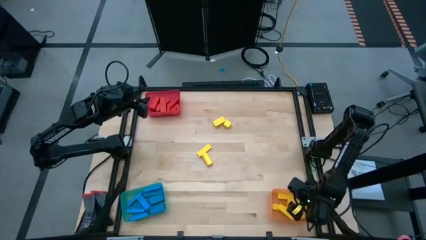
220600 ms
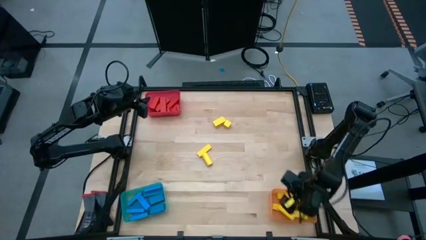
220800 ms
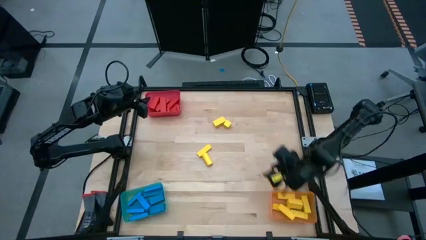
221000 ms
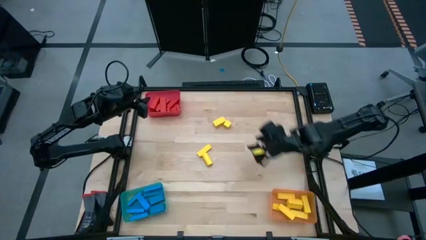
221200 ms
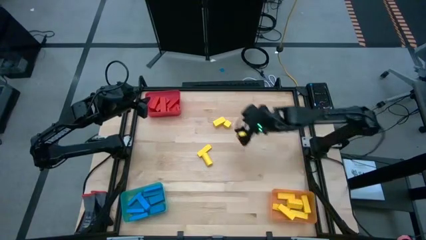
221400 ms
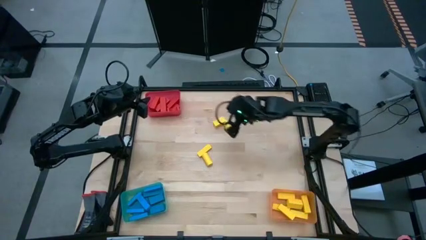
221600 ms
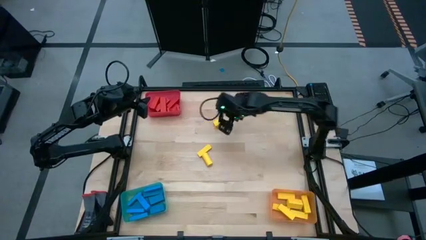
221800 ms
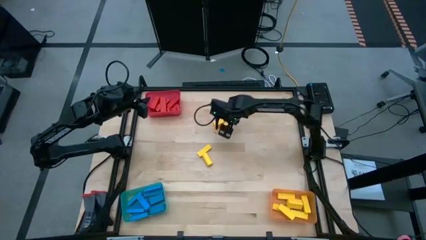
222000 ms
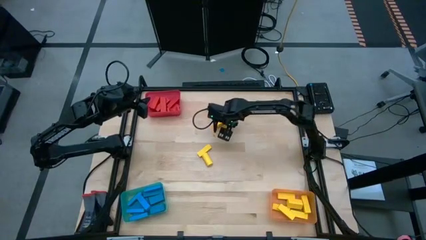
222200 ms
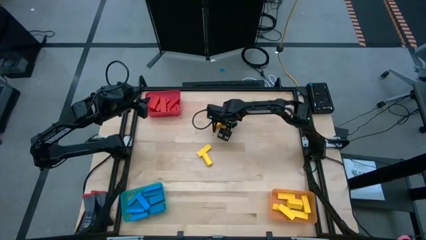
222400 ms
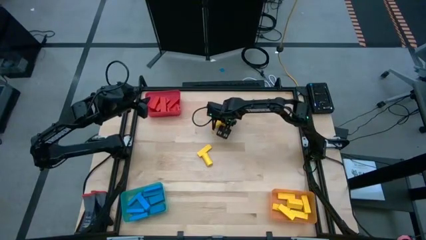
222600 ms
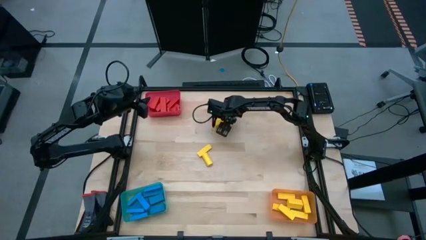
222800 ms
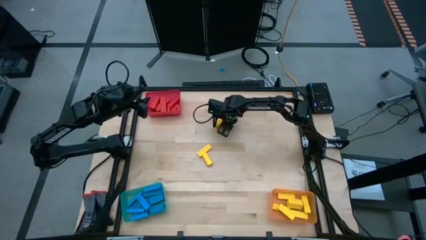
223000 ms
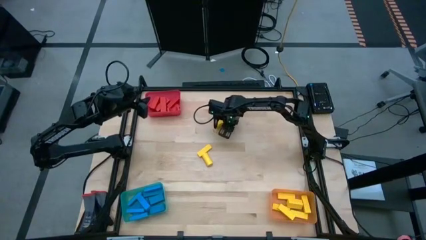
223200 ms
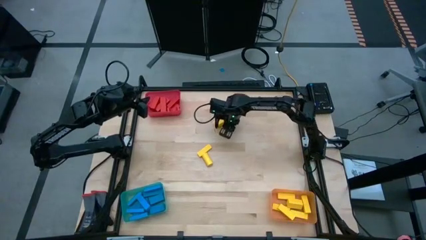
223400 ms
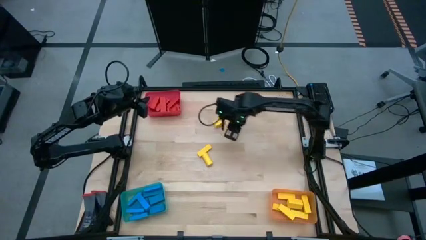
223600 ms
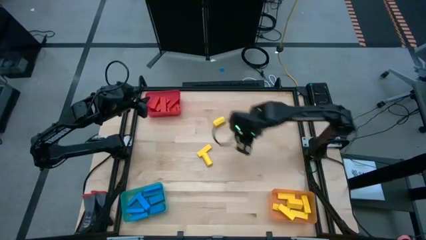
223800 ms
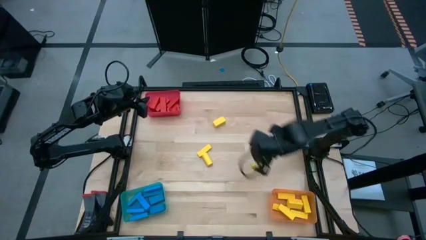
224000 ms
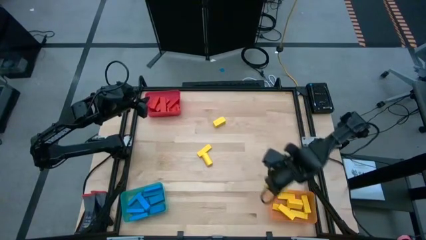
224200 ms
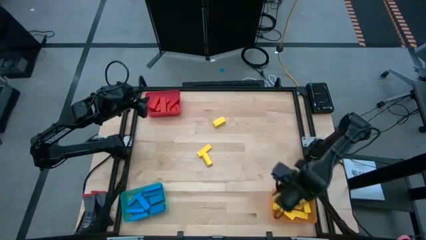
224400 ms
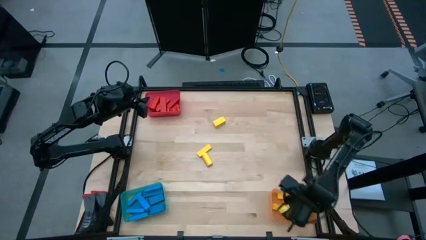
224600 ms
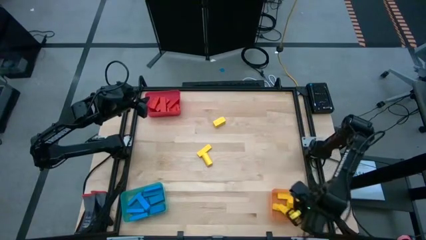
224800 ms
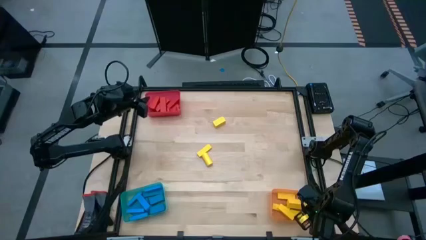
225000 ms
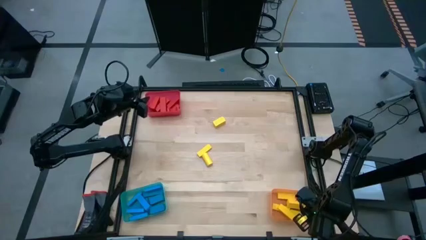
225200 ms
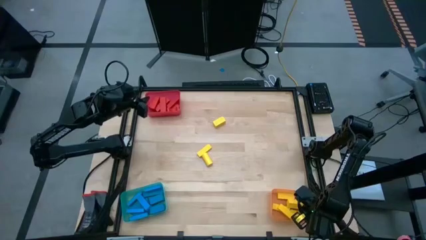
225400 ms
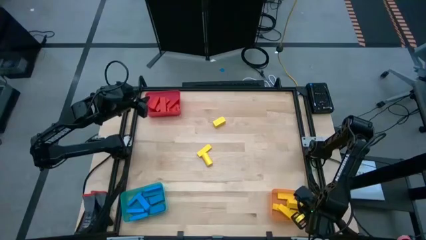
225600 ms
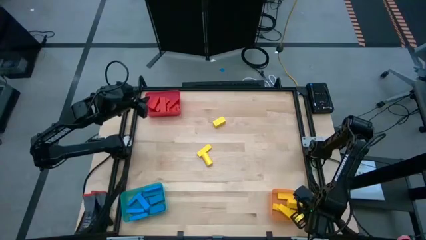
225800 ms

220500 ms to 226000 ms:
Task: Sort blocks
Put the yellow block into the orange bin

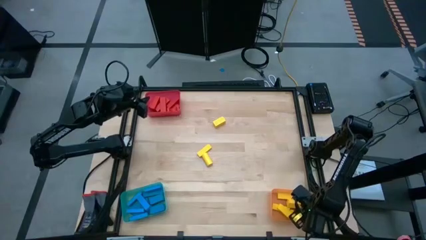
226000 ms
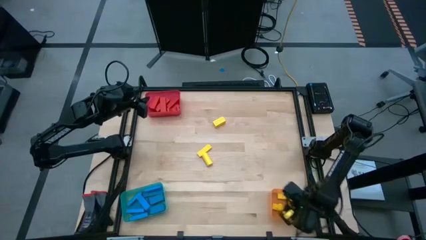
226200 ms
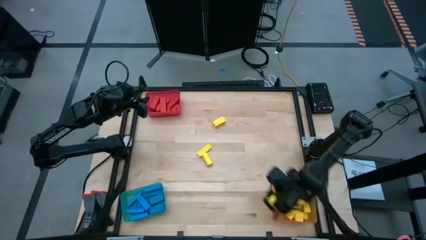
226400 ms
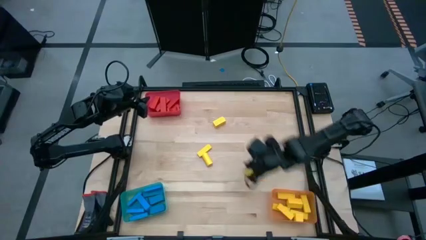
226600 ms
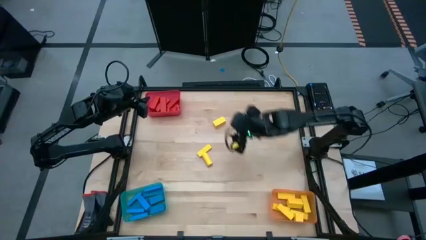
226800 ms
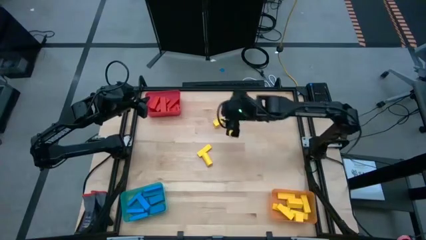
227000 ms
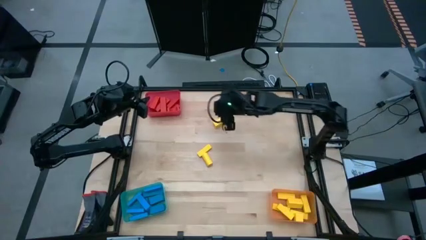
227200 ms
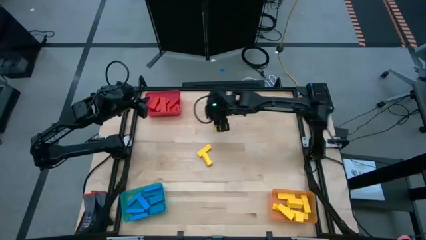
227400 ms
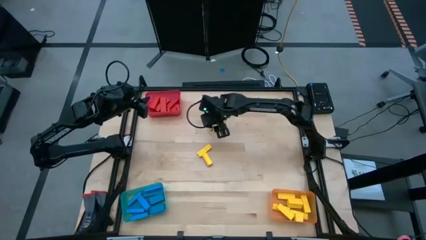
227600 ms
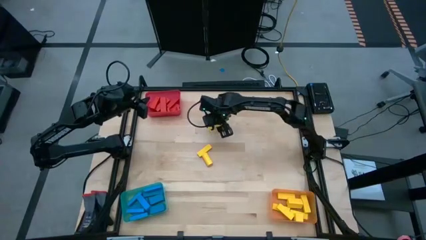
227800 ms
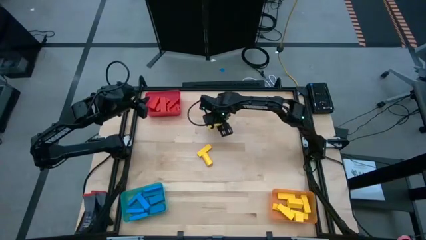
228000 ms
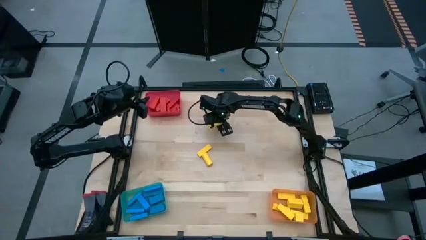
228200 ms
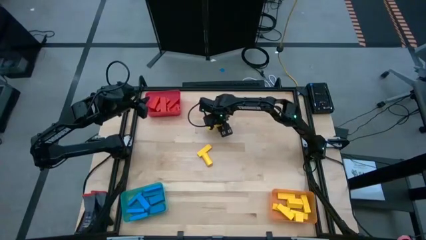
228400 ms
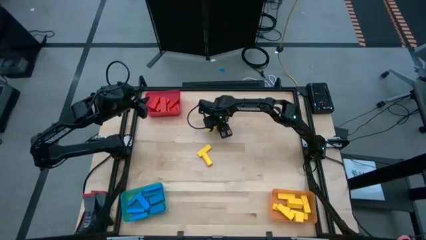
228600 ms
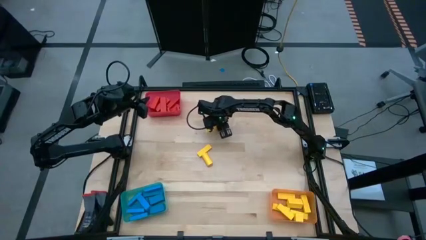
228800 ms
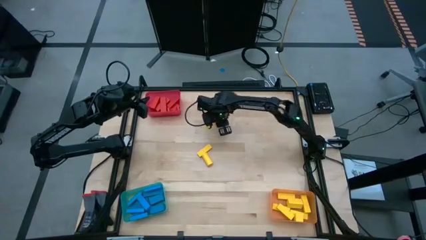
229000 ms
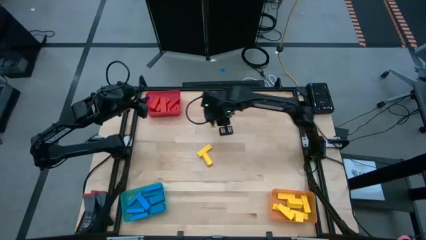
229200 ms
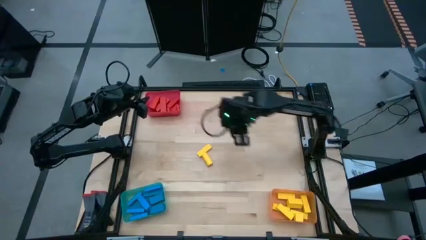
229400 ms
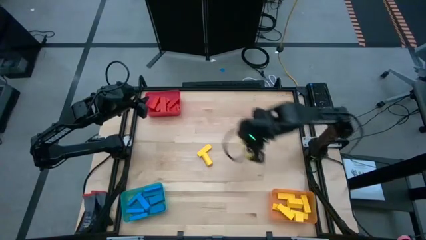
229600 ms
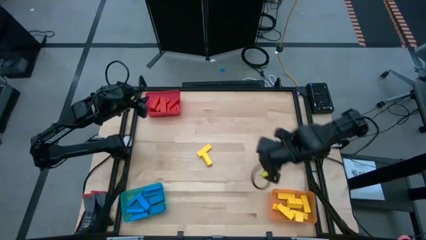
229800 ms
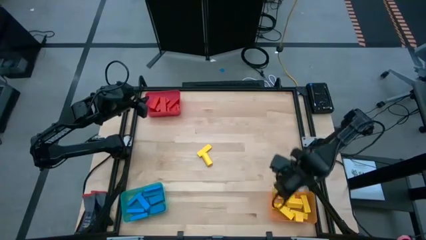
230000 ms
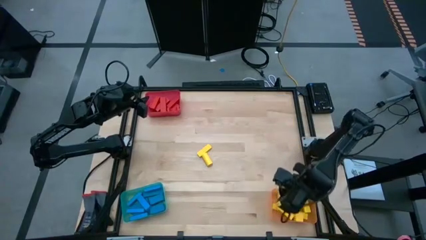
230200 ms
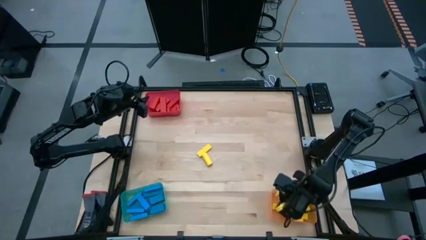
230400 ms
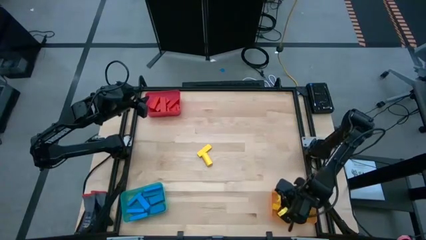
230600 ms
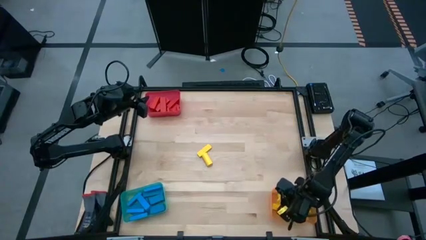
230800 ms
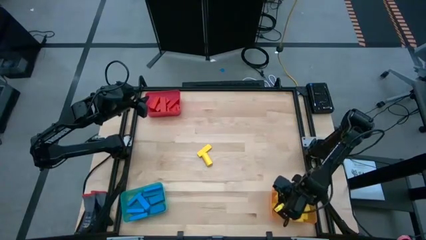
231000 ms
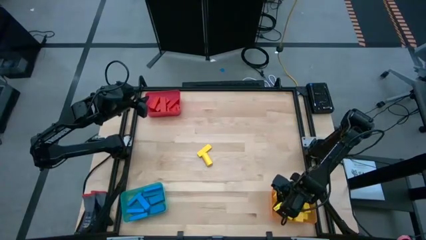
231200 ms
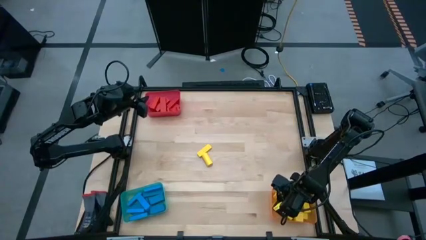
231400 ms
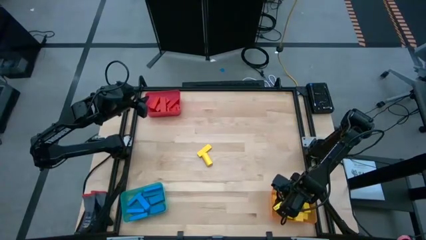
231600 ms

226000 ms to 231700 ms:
Put the yellow block into the orange bin

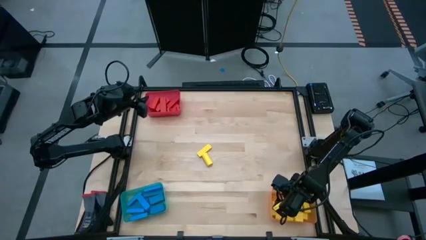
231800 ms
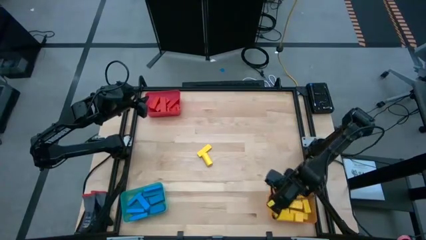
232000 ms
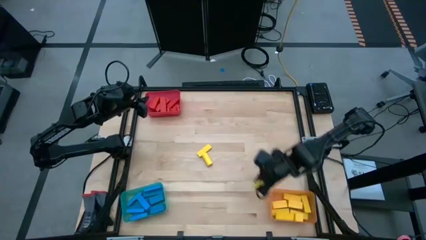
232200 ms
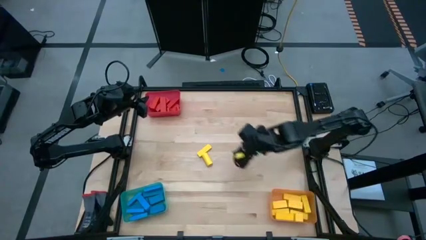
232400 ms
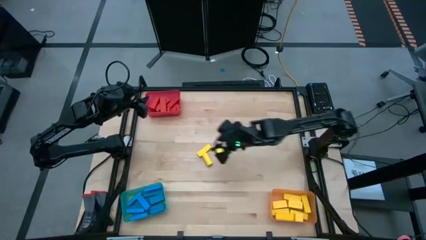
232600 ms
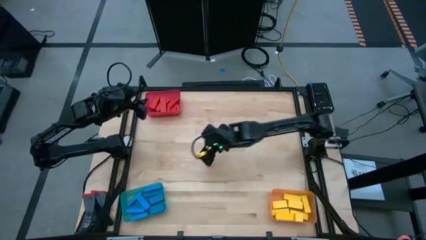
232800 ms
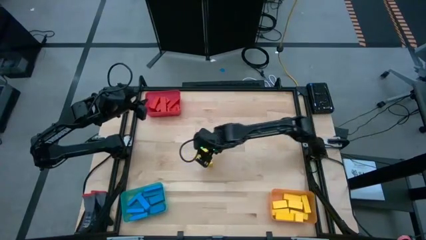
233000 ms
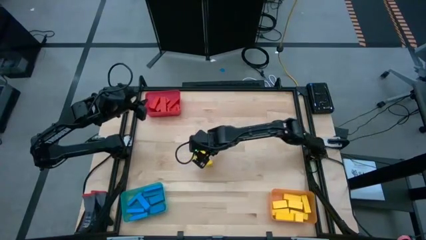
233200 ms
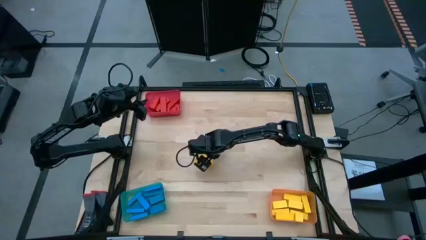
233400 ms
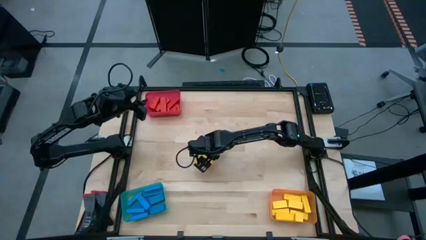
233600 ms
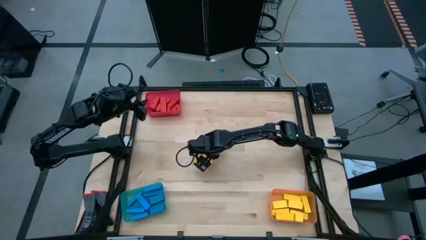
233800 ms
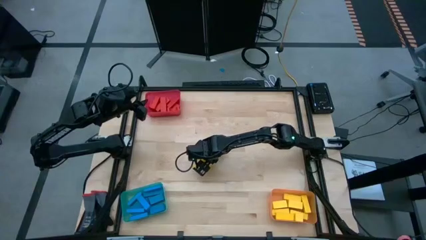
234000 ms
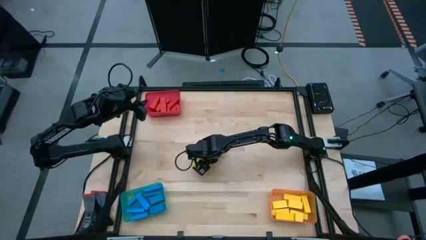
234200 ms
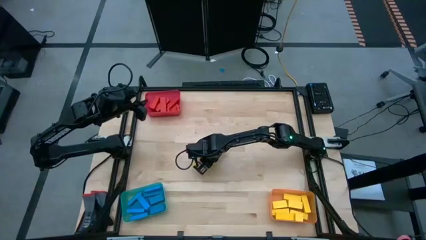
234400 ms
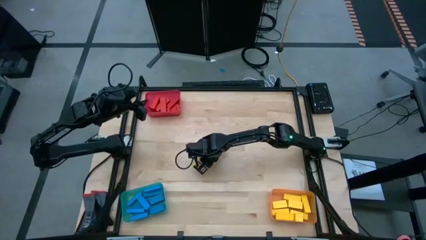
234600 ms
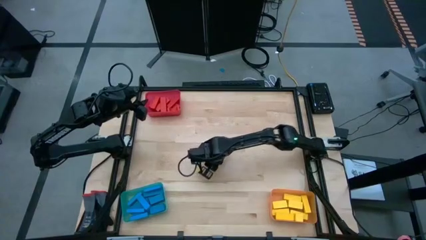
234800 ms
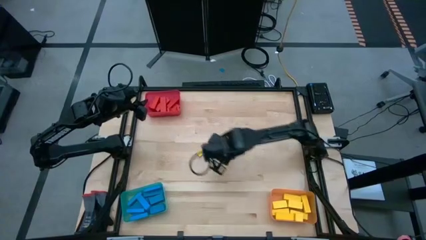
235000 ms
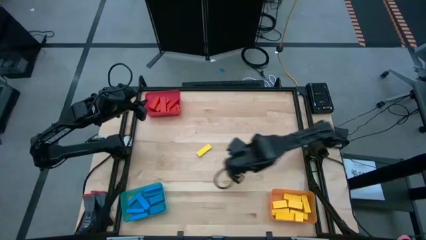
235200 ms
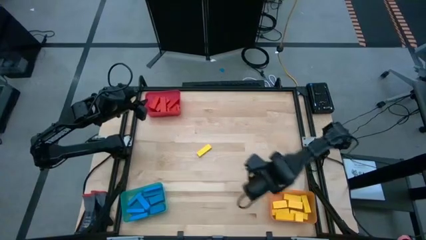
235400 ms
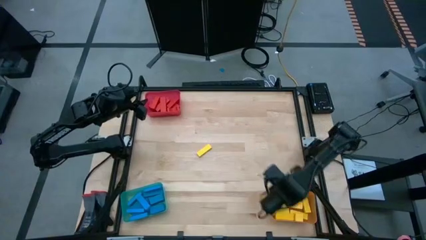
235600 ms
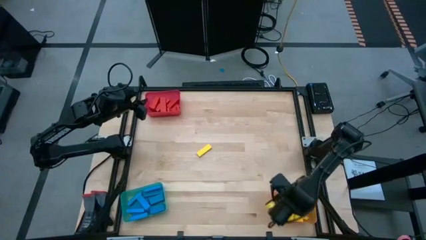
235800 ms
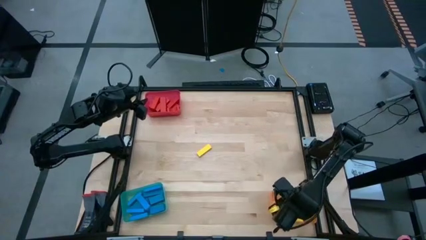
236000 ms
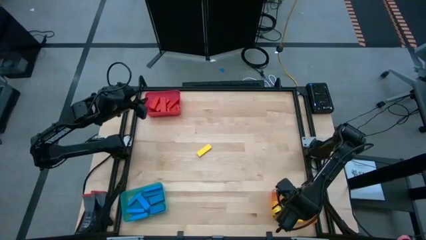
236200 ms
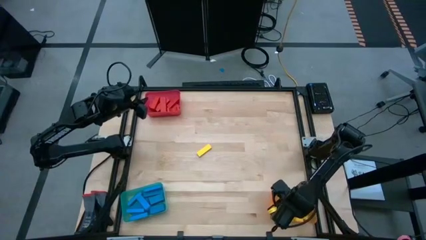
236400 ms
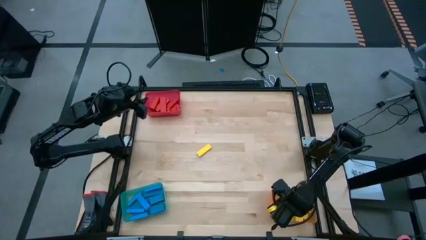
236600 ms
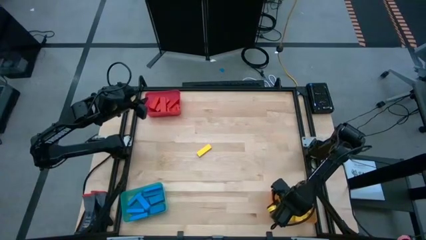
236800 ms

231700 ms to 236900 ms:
Put the yellow block into the orange bin
